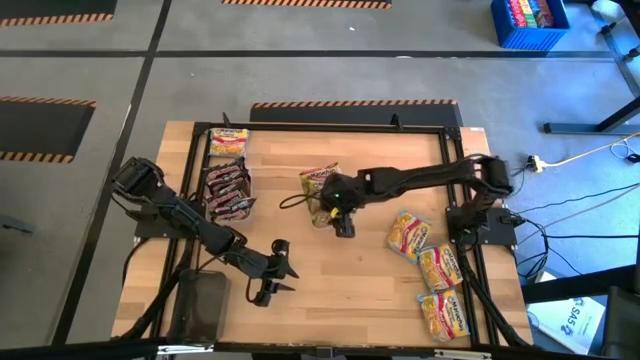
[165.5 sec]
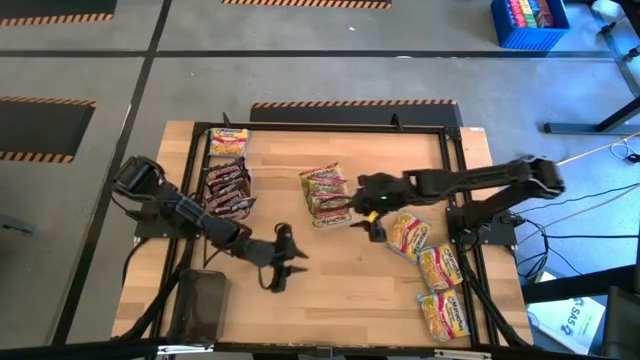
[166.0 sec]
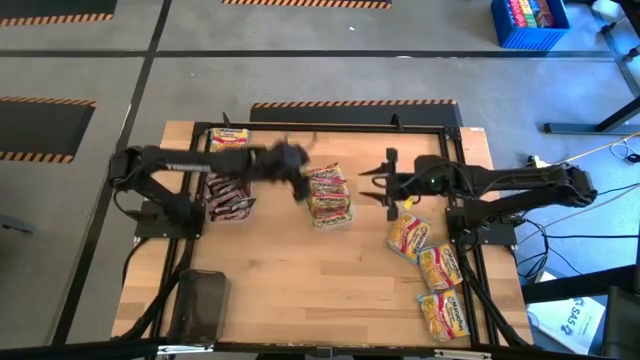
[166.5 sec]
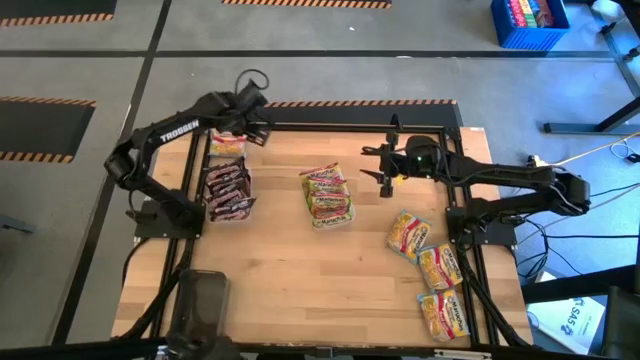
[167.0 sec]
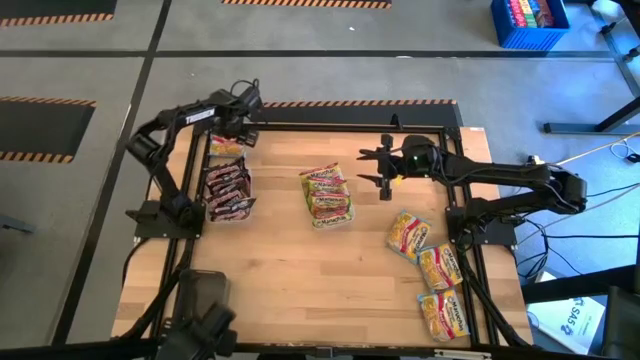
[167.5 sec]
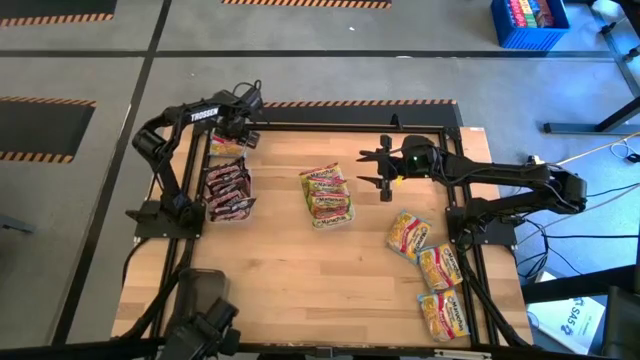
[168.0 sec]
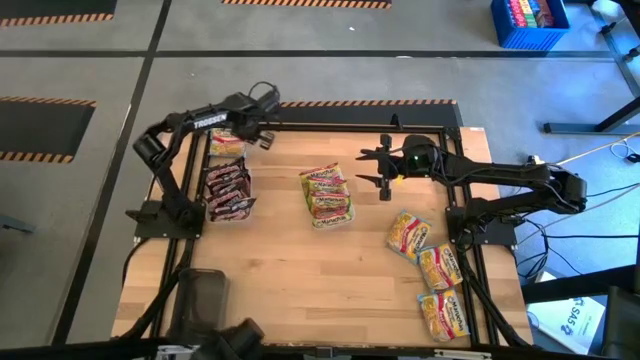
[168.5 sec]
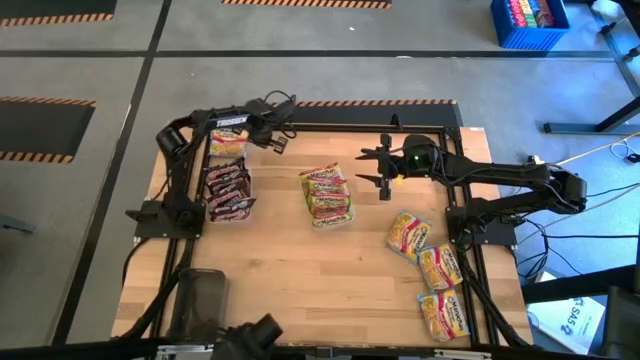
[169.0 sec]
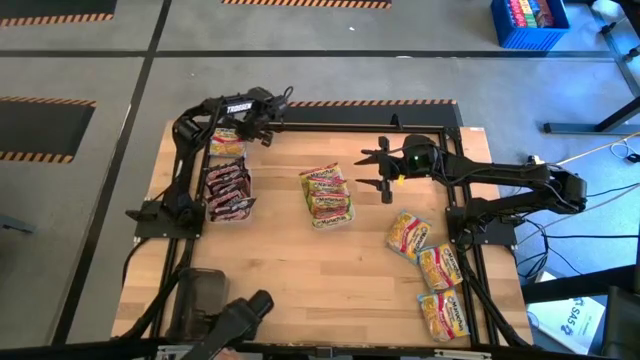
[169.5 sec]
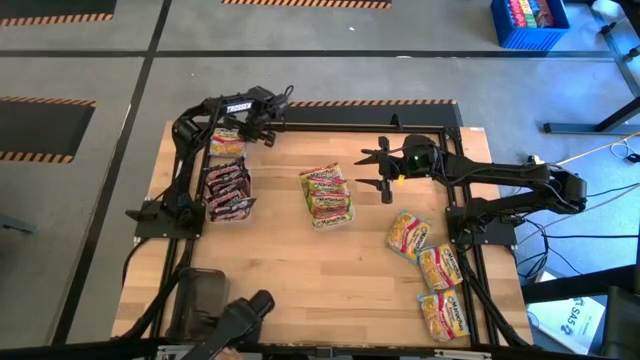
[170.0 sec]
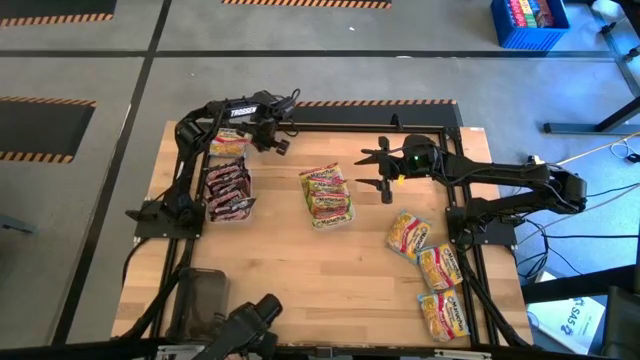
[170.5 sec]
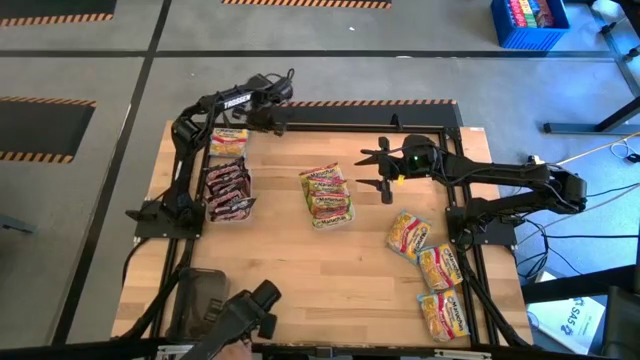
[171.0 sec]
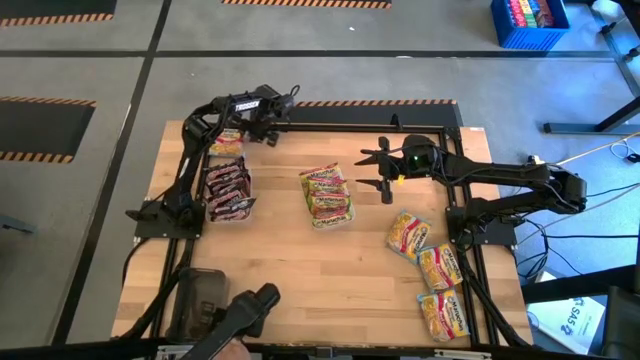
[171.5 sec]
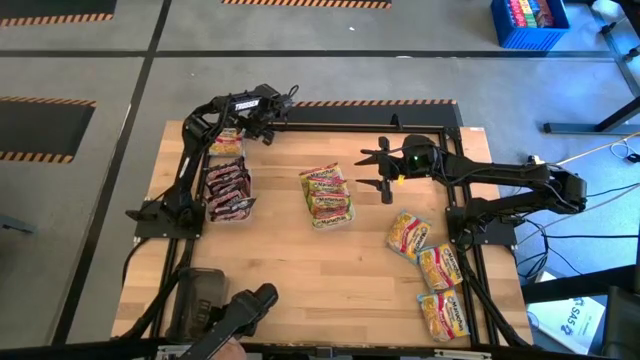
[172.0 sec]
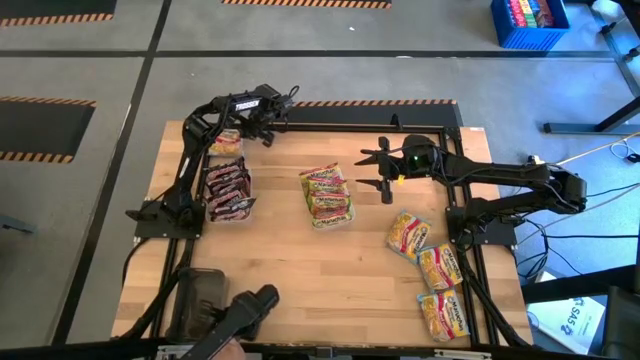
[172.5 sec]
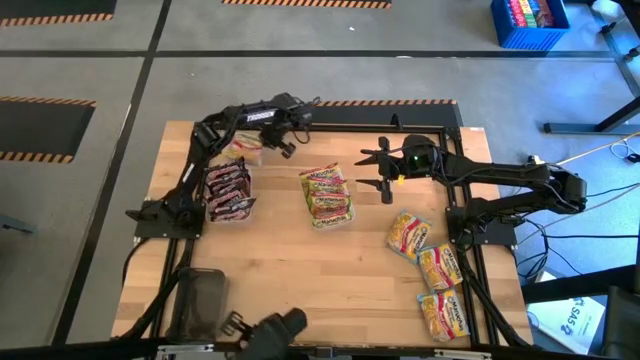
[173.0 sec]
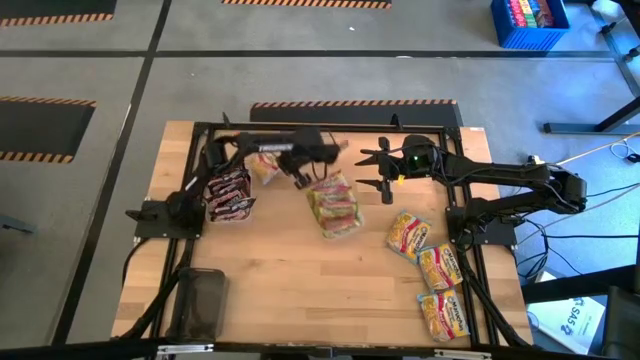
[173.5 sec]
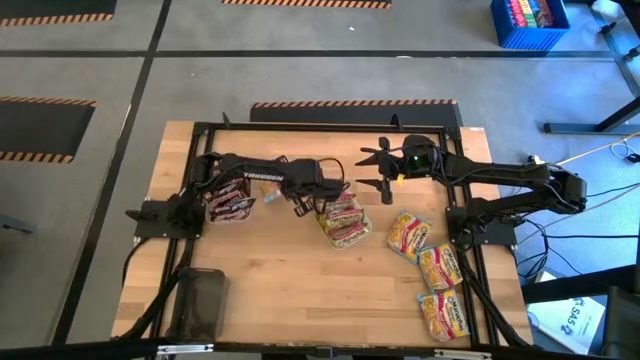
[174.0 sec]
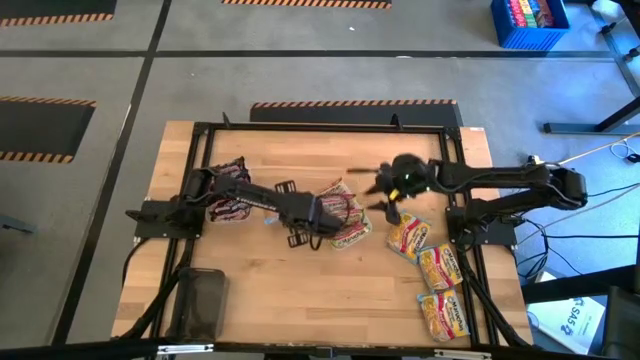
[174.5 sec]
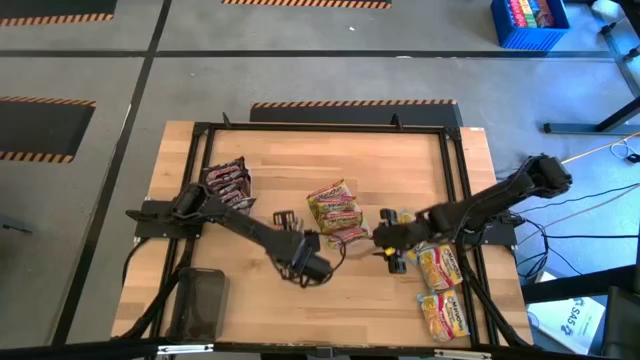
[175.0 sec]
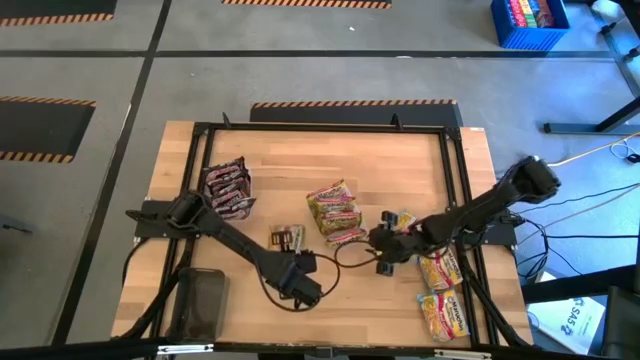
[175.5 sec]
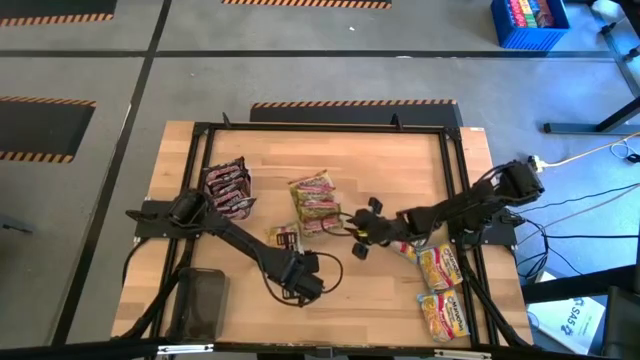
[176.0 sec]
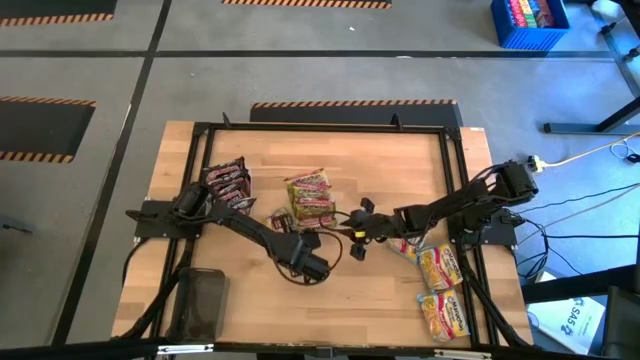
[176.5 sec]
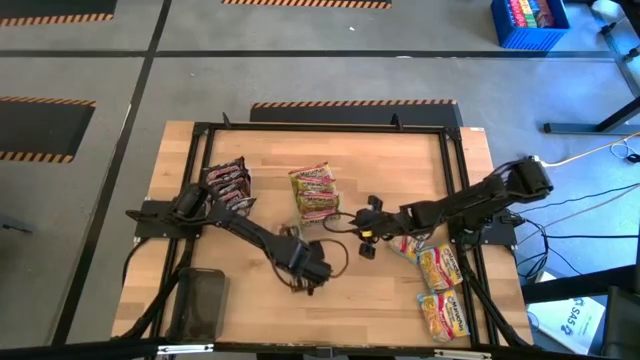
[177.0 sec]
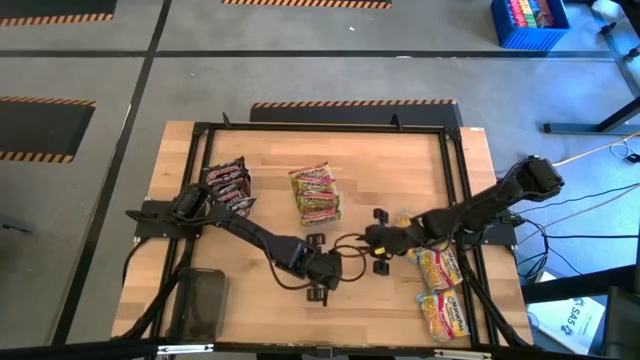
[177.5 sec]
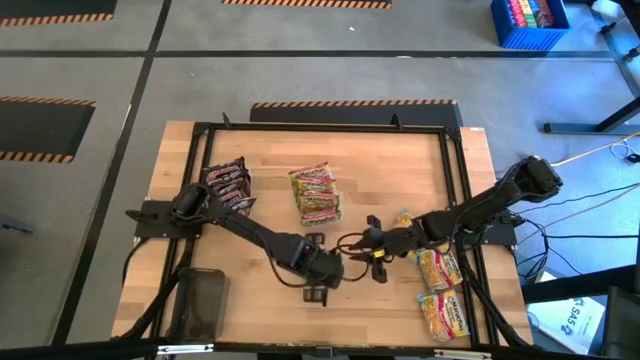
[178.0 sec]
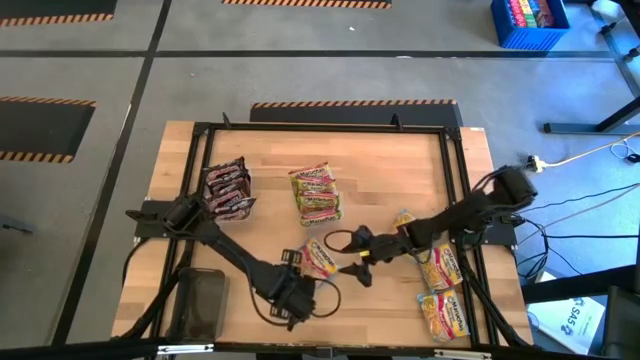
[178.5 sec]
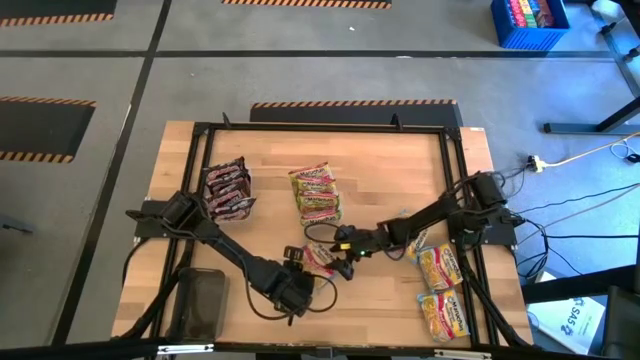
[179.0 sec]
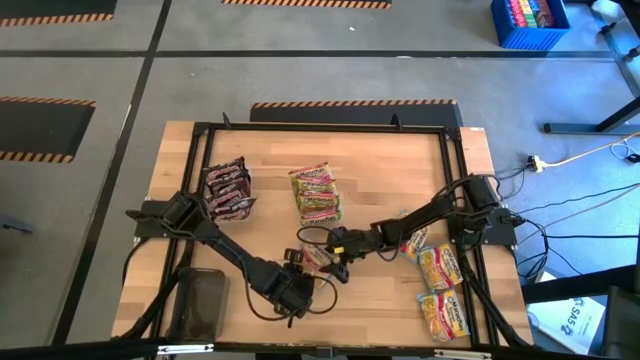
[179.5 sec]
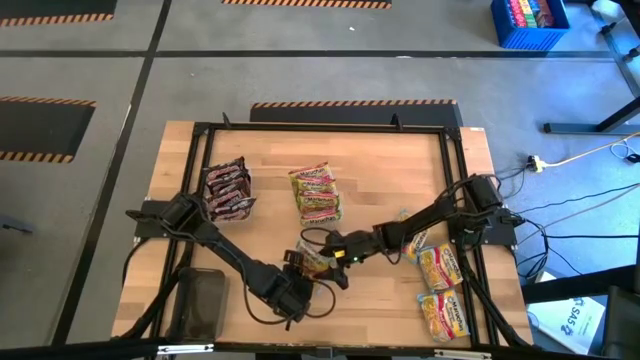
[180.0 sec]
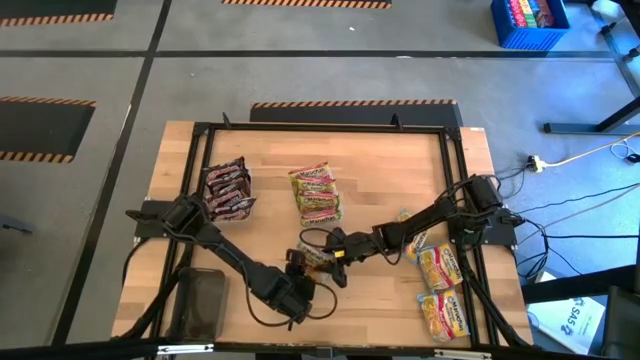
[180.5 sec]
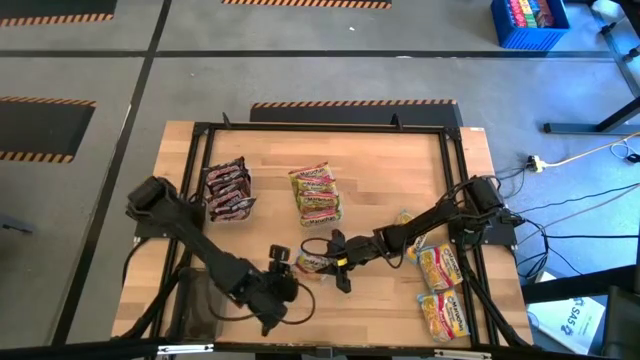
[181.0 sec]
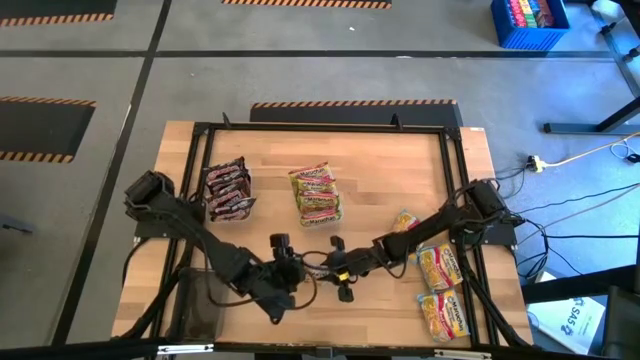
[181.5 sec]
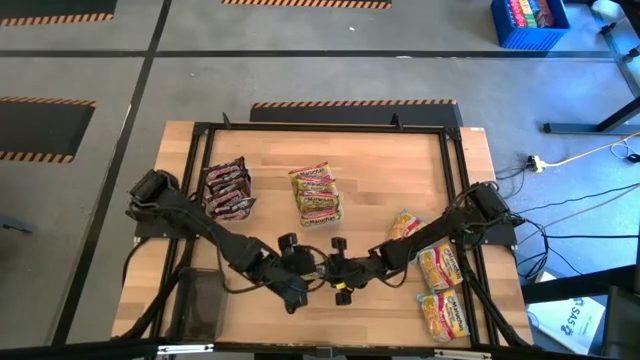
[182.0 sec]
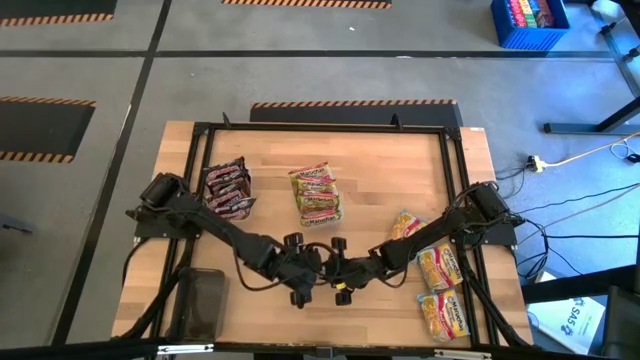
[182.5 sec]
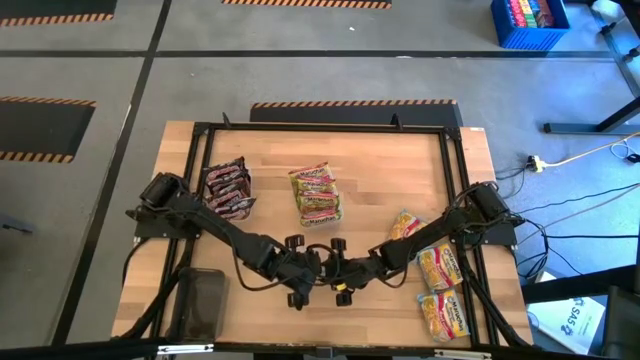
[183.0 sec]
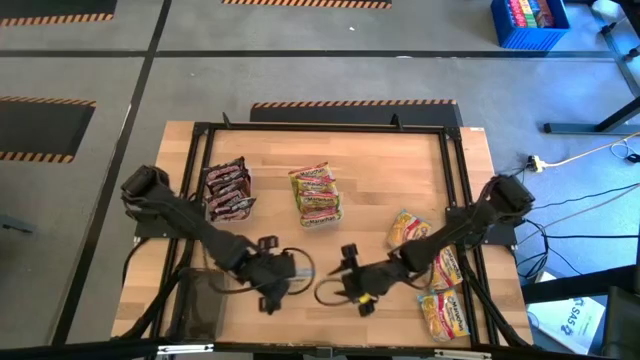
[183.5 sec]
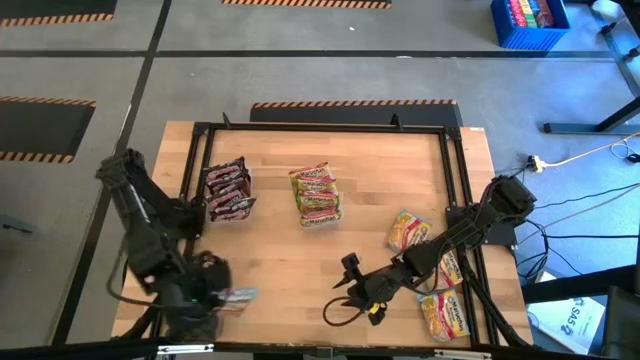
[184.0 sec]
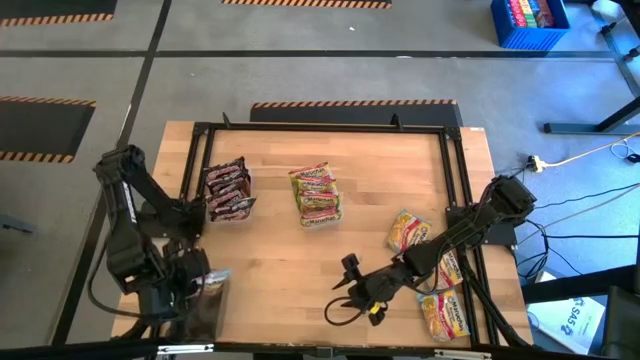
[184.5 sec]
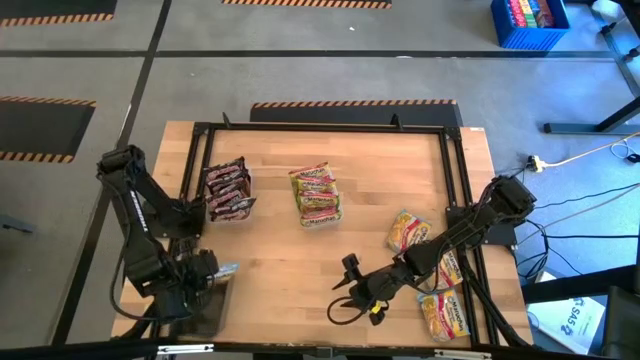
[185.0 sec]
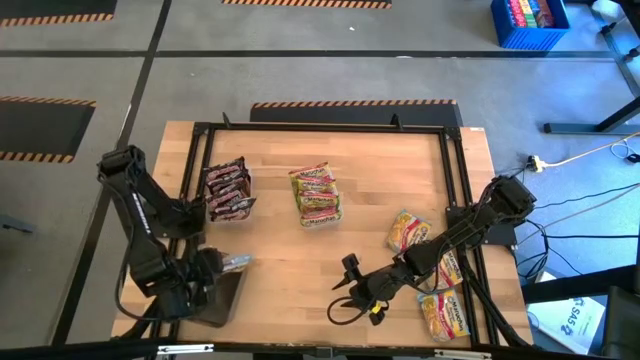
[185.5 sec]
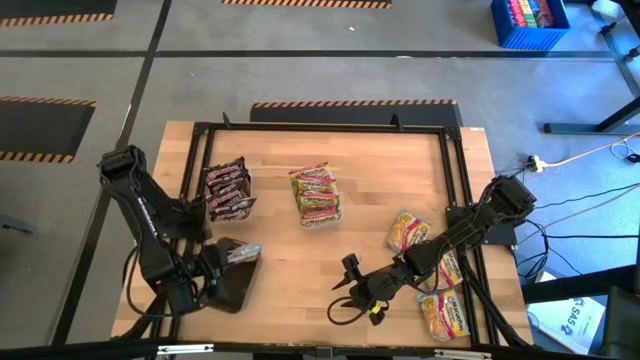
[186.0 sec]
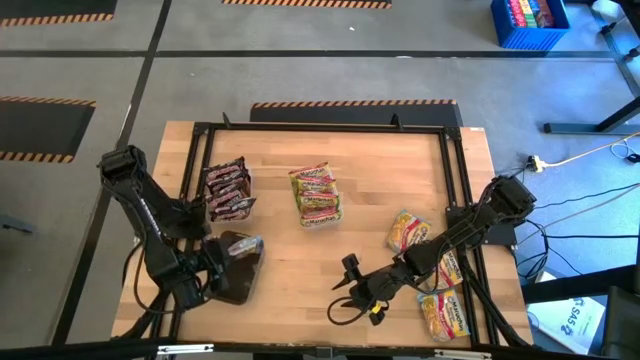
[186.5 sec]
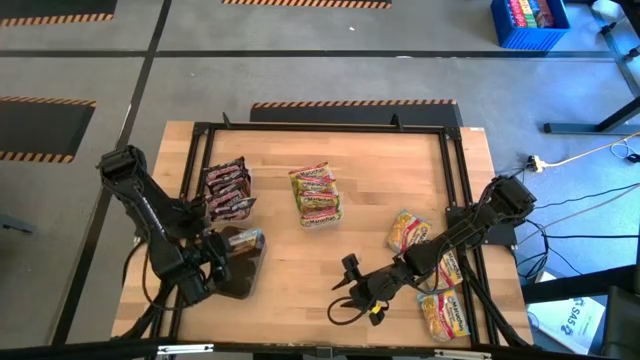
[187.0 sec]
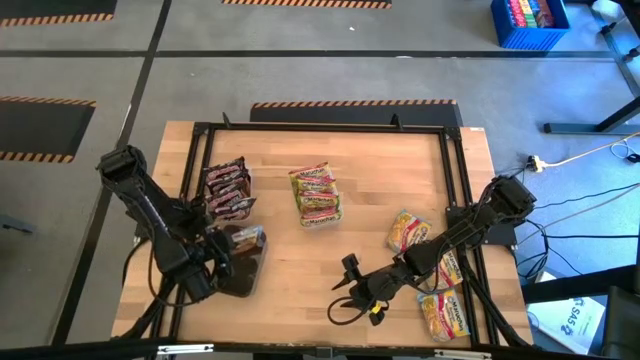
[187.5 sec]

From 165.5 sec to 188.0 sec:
Task: Sort Maruchan noodles
Put the blue noodle pack into the black bin
